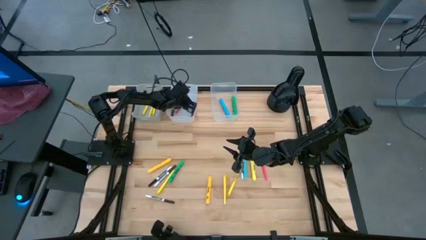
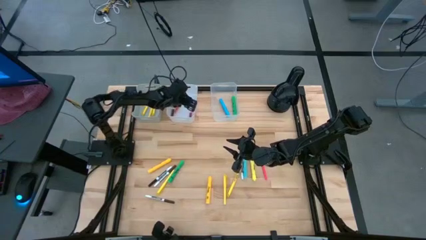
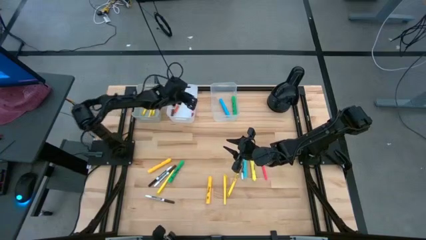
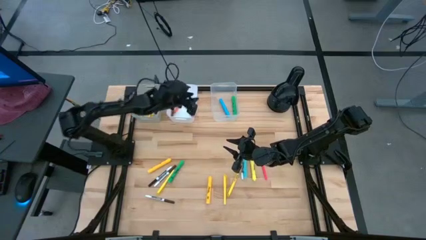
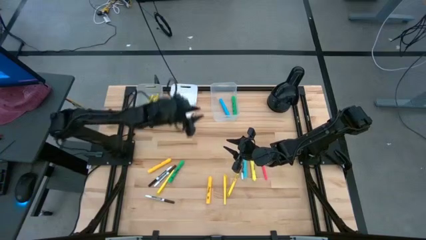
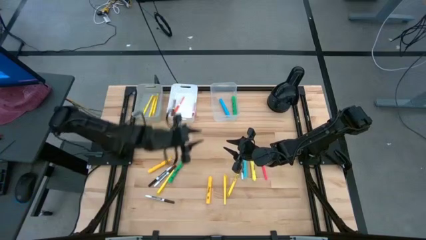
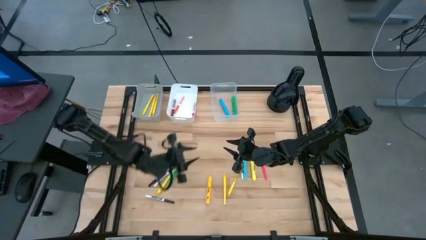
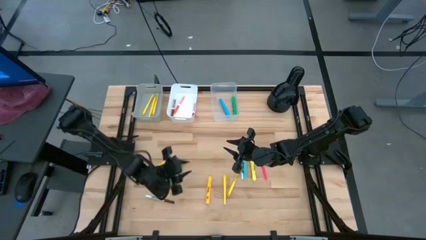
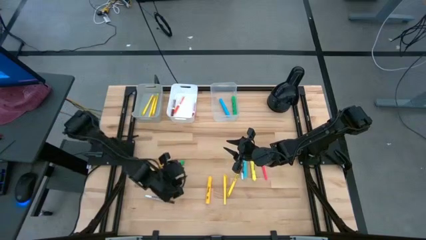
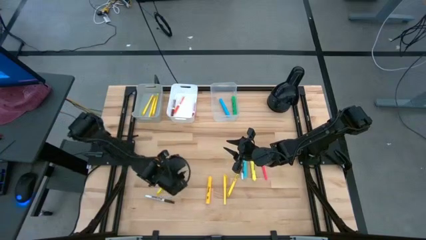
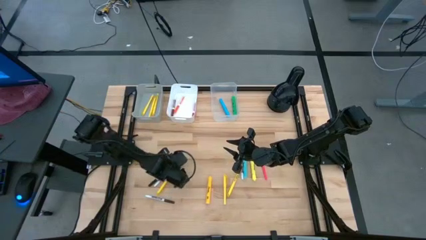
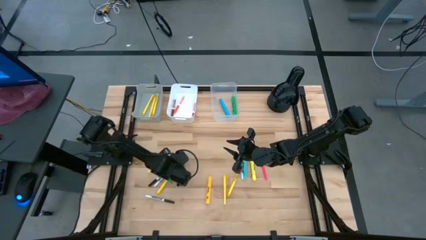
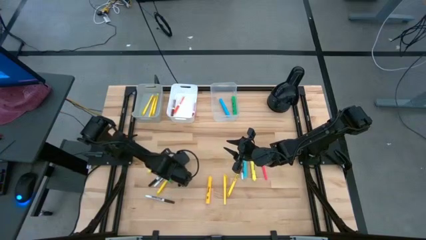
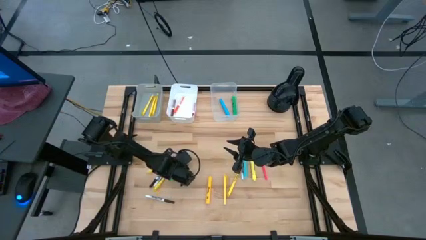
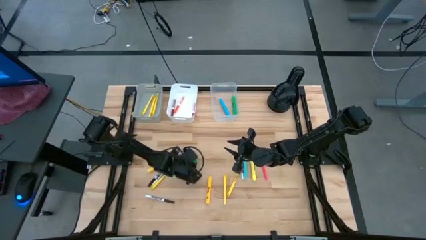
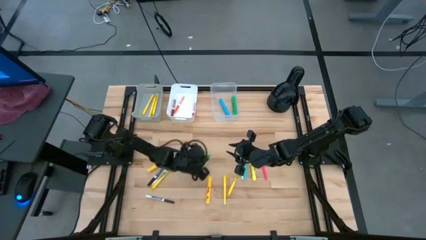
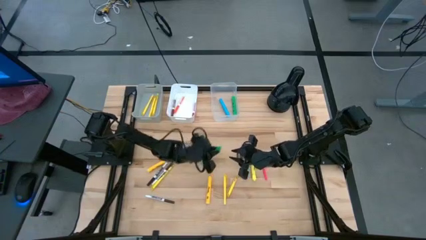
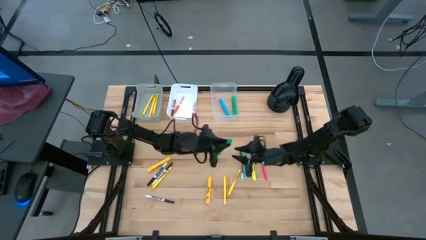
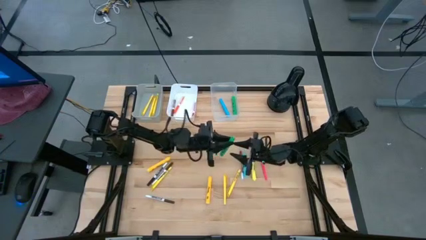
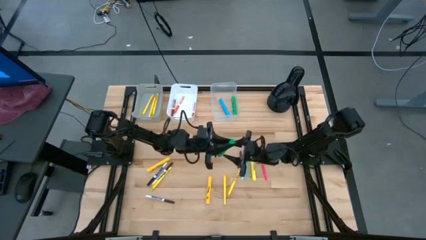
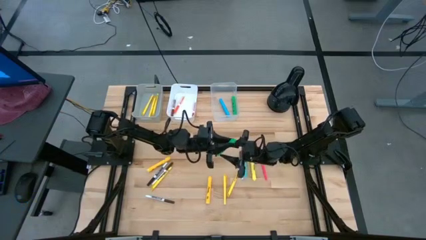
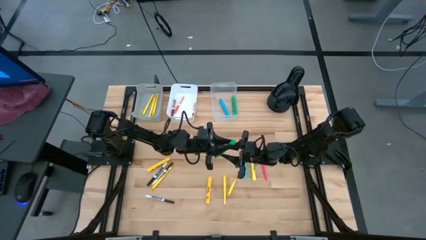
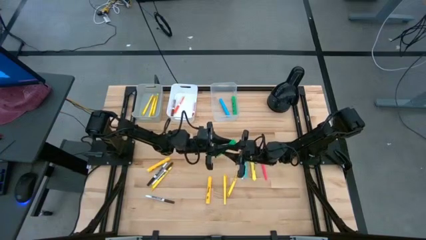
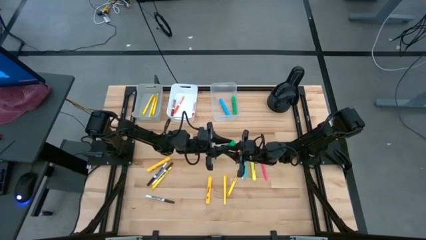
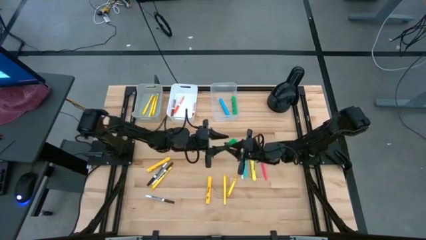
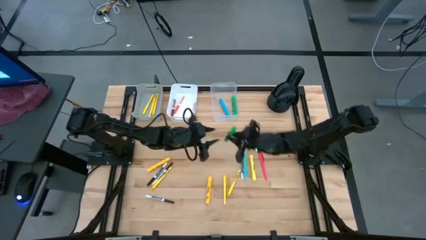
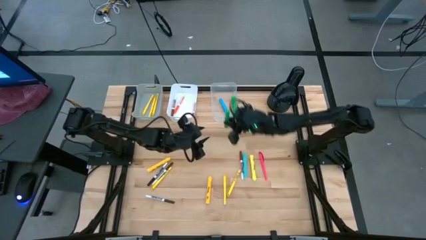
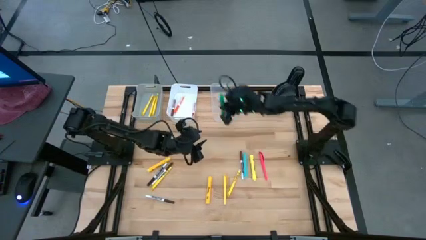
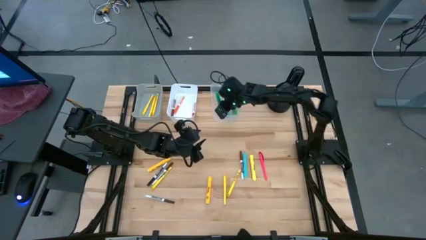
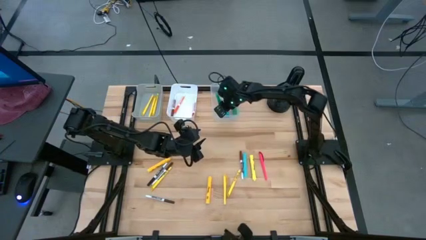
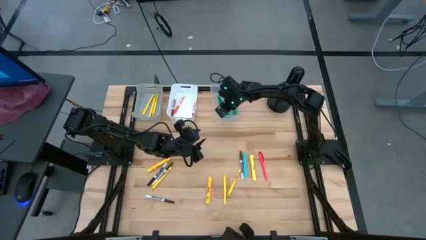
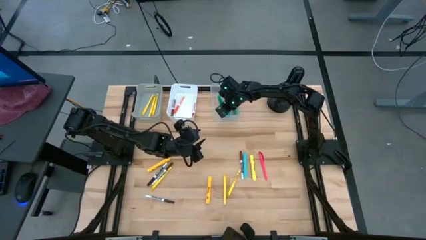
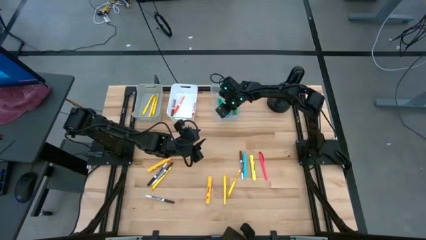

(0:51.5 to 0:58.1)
Task: Pick & Place Markers
Put the green highlighter into the transparent bin

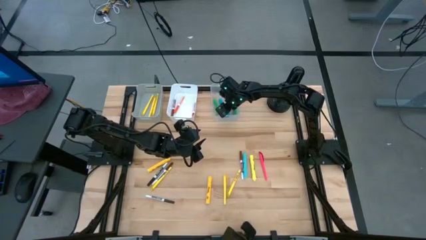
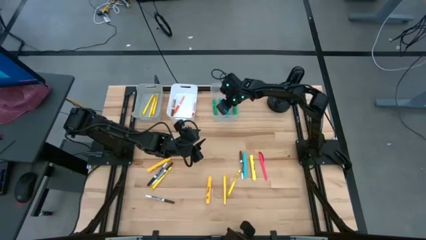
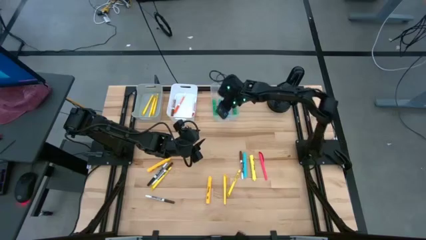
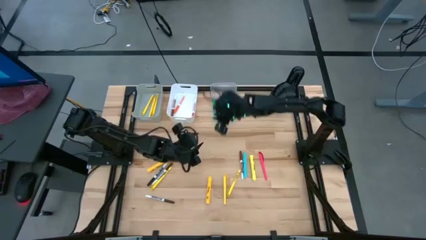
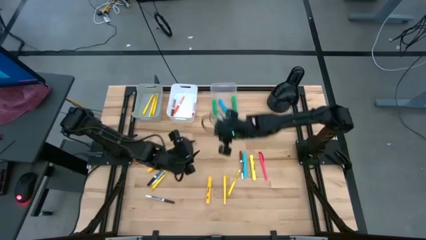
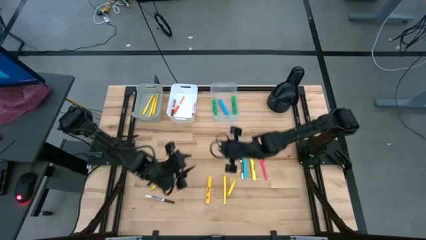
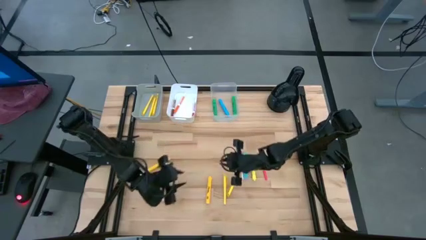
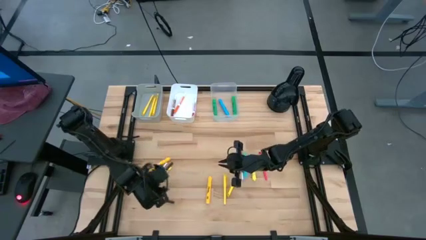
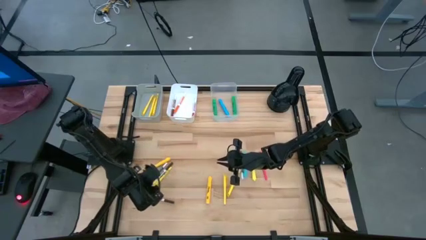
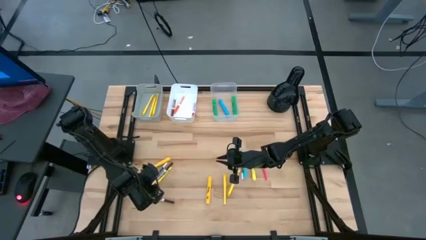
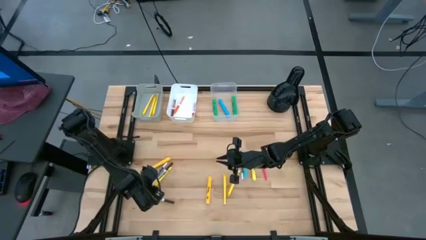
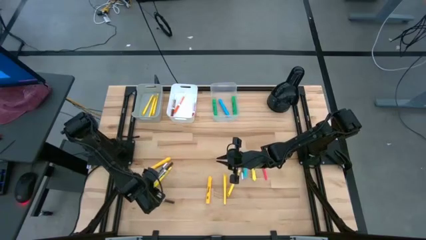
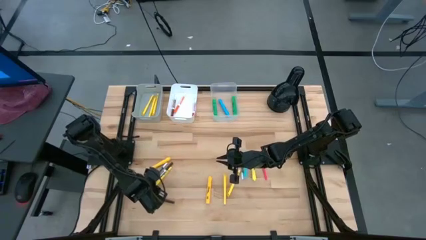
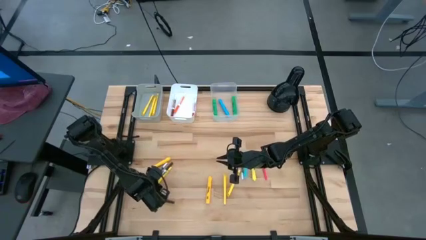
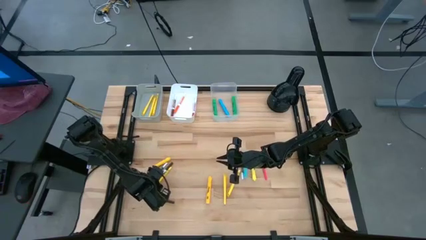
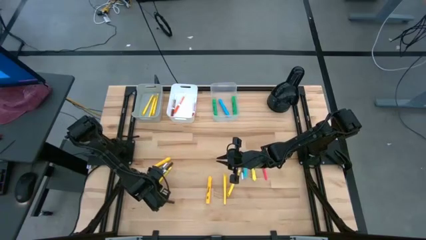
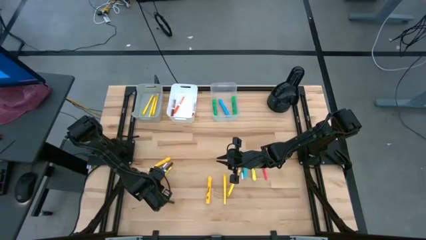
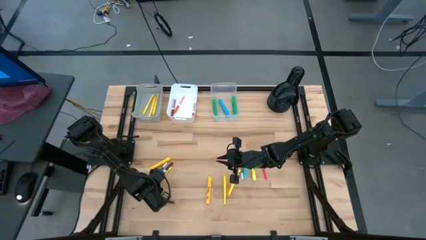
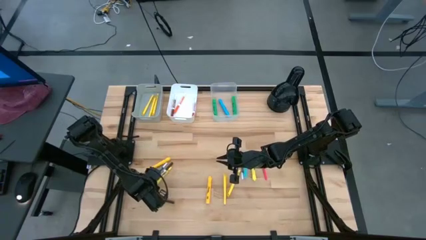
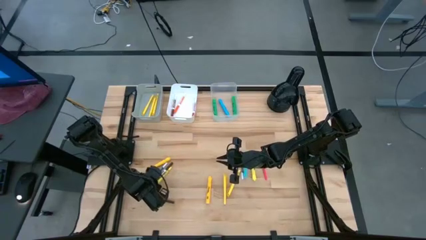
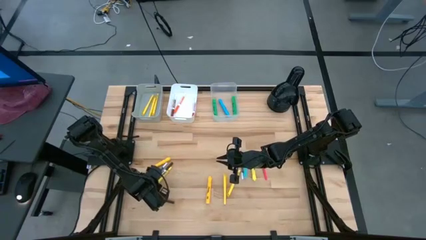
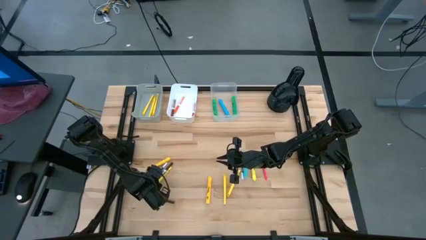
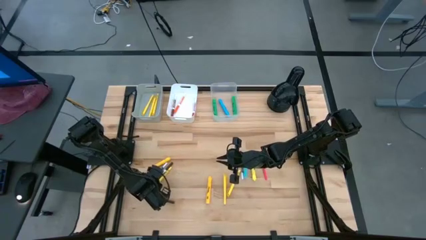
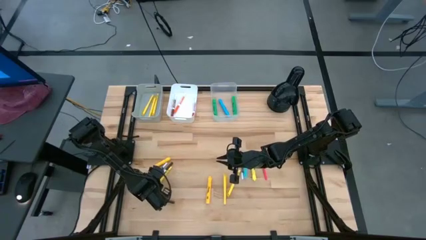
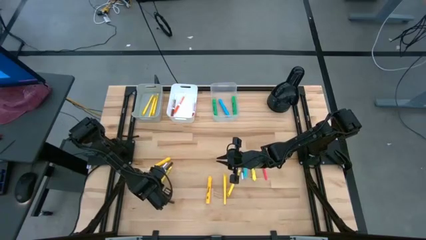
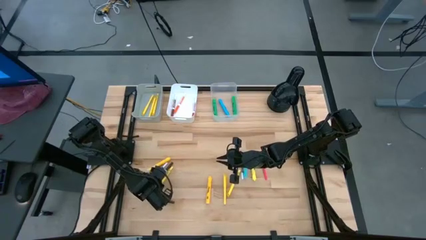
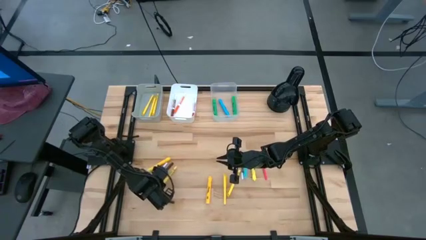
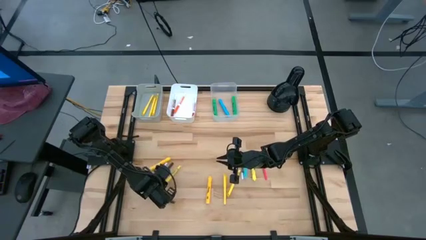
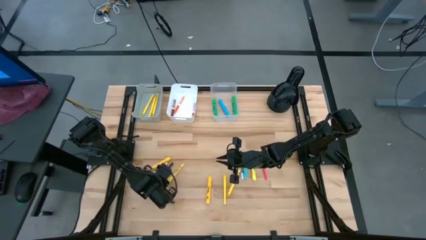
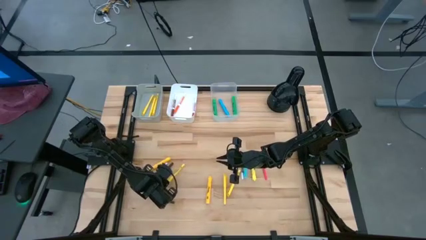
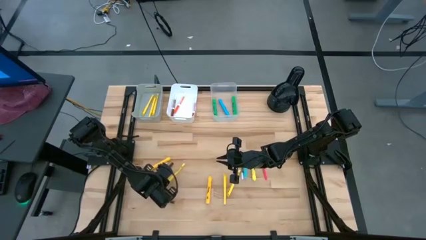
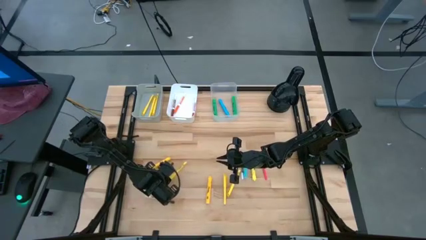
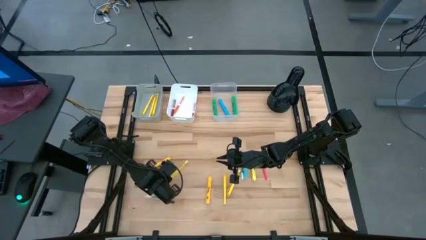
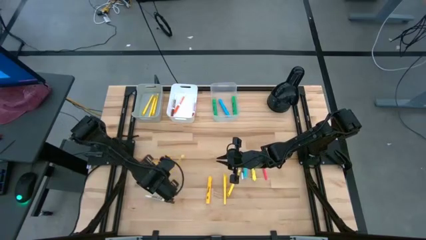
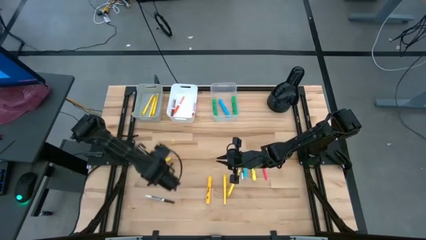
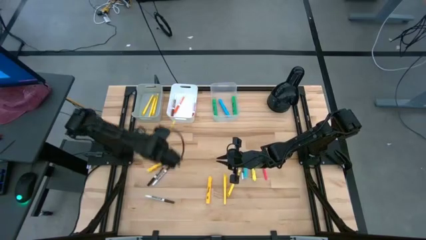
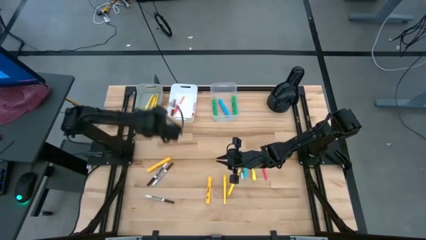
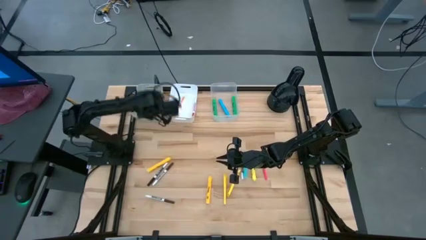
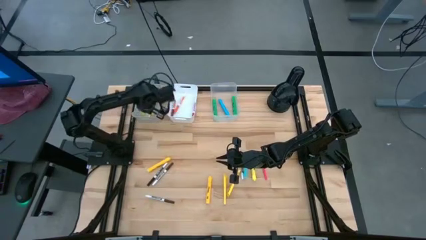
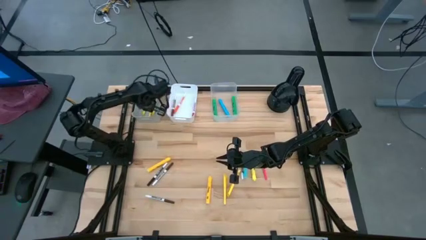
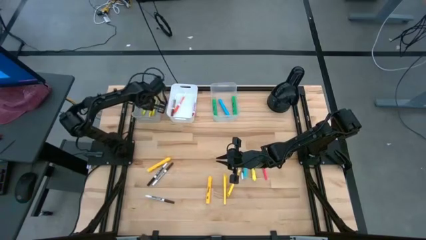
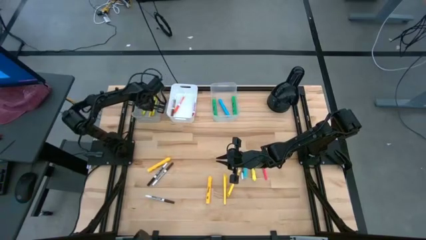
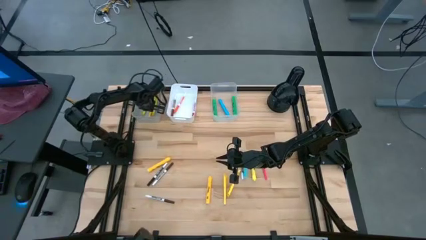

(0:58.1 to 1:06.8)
Put the yellow marker into the gray bin

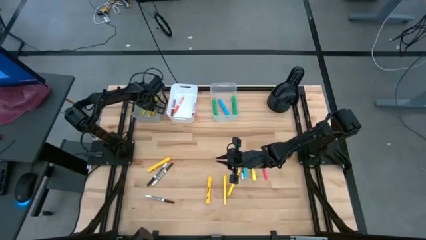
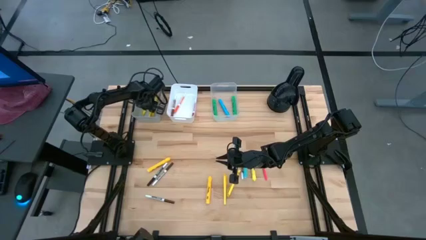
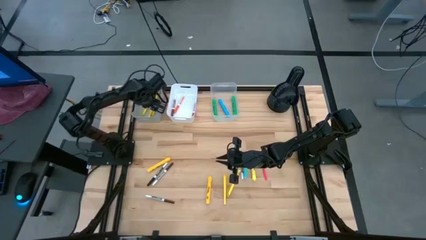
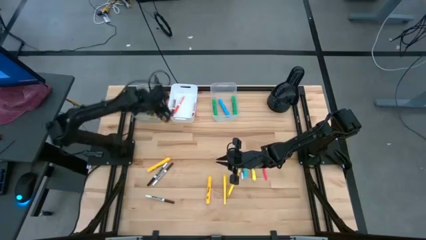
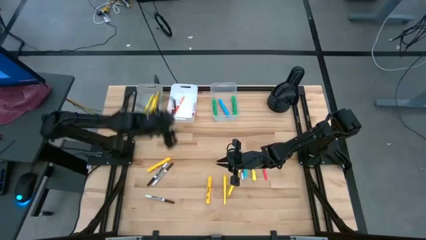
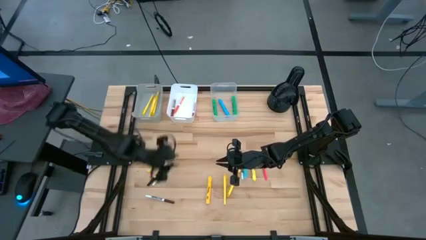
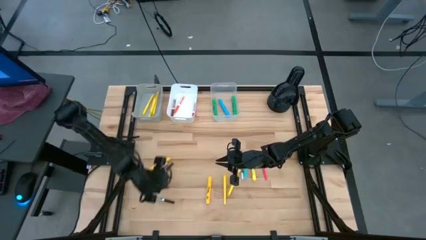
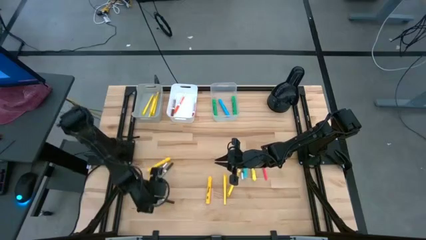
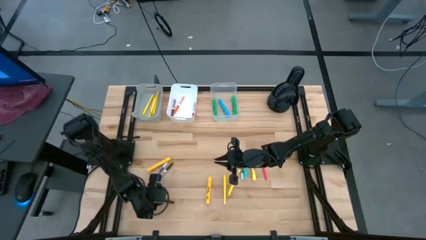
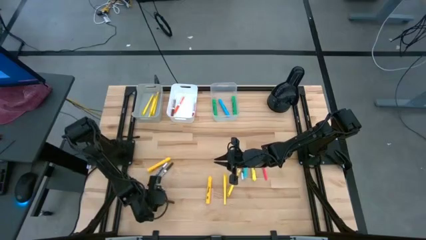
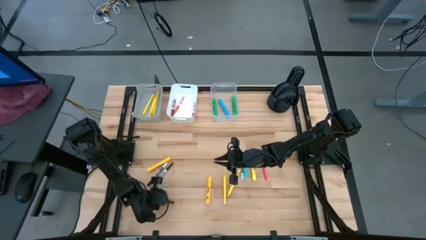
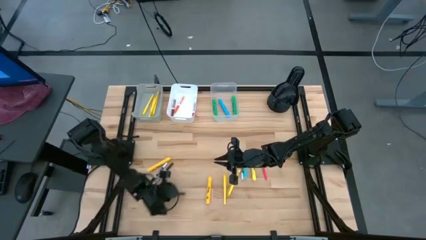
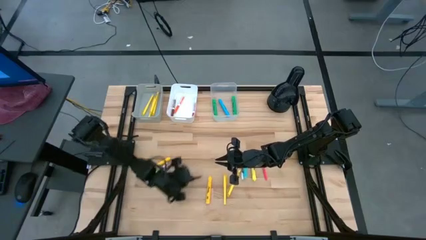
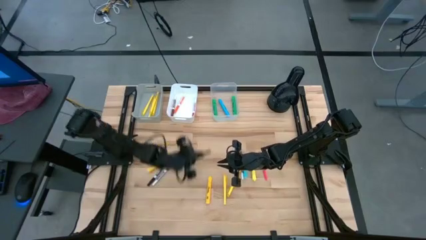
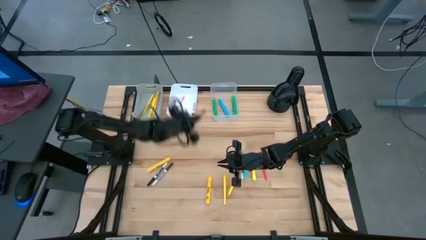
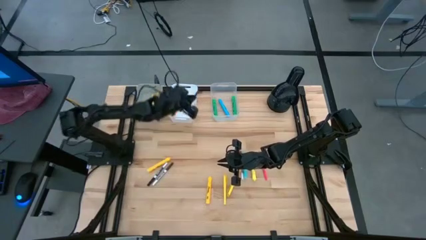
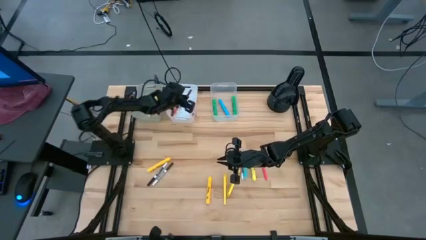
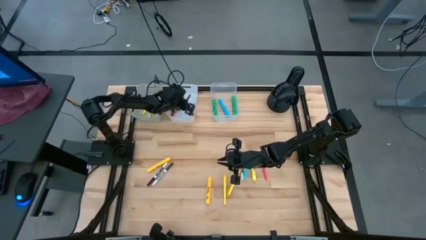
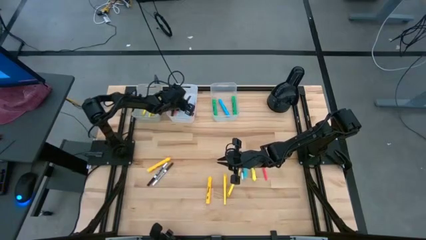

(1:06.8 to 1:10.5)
Put the brown erase marker into the white bin
